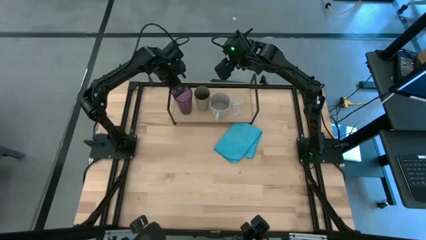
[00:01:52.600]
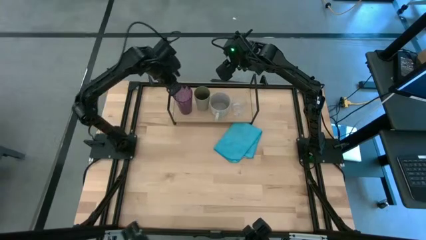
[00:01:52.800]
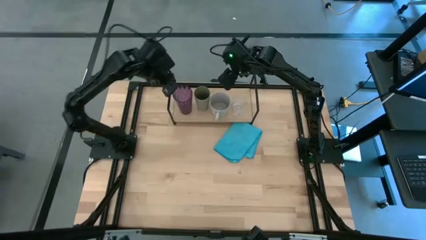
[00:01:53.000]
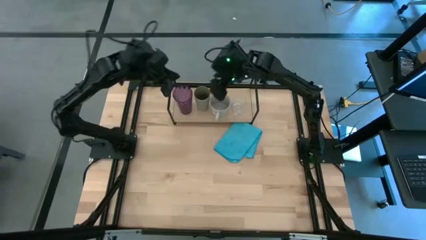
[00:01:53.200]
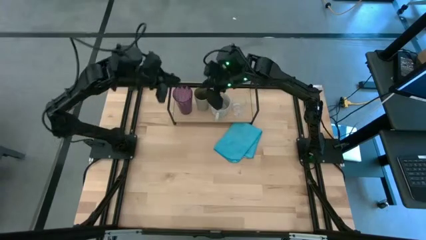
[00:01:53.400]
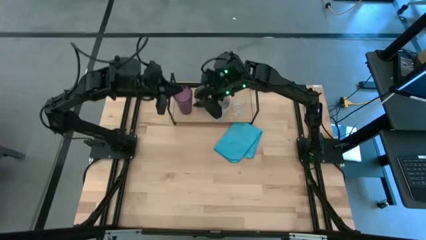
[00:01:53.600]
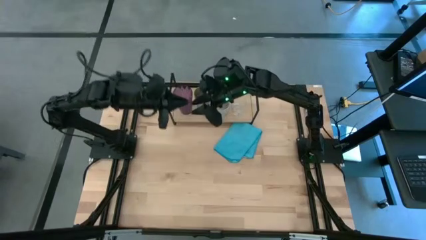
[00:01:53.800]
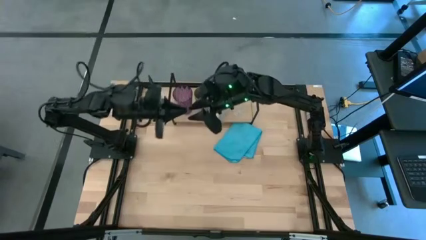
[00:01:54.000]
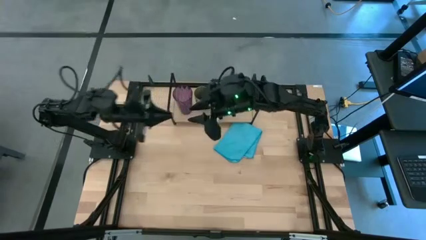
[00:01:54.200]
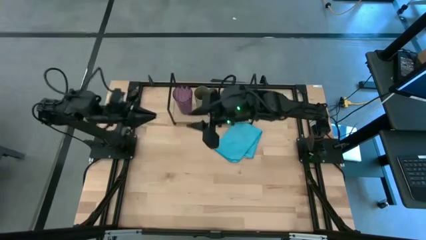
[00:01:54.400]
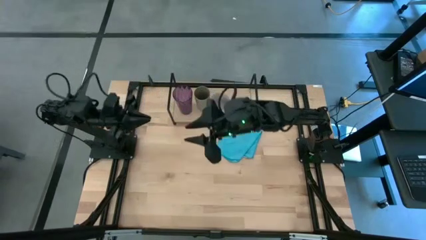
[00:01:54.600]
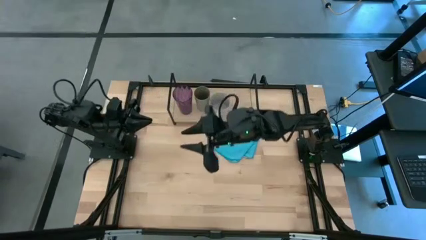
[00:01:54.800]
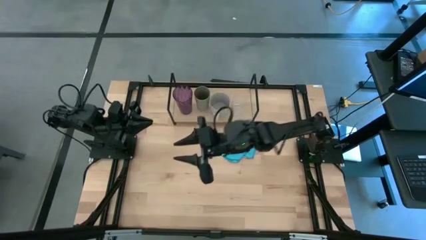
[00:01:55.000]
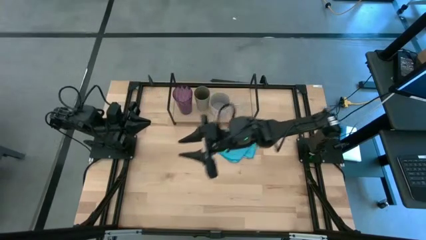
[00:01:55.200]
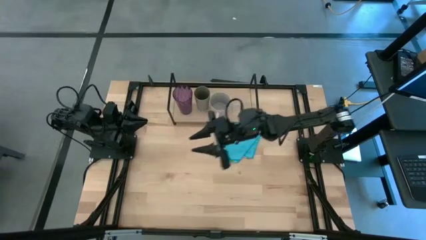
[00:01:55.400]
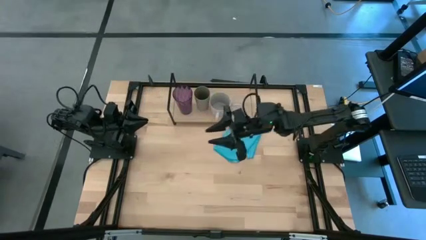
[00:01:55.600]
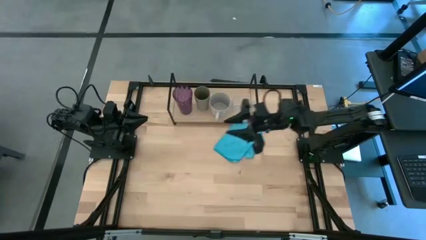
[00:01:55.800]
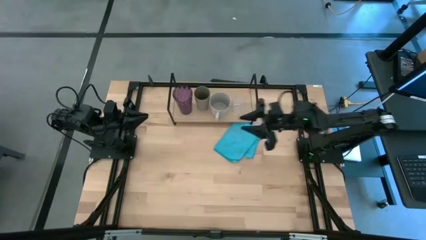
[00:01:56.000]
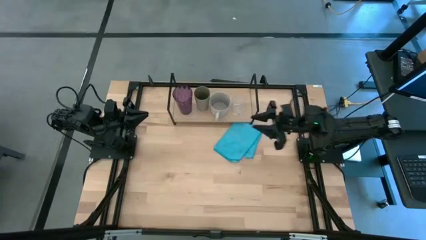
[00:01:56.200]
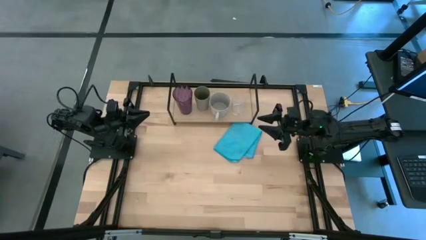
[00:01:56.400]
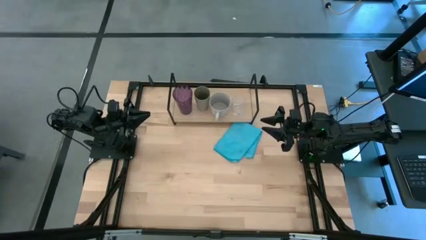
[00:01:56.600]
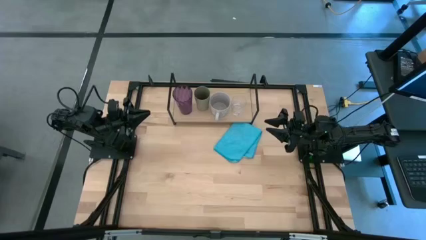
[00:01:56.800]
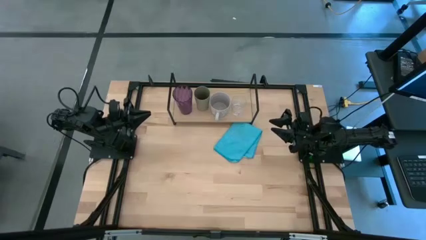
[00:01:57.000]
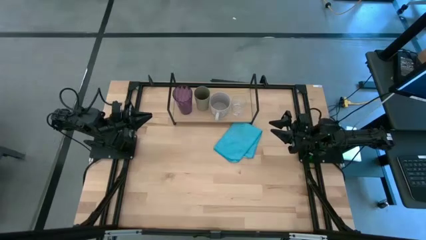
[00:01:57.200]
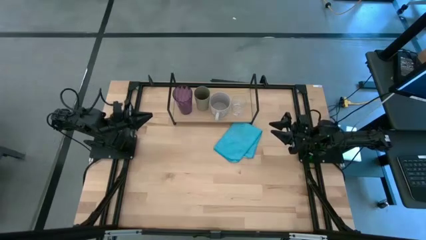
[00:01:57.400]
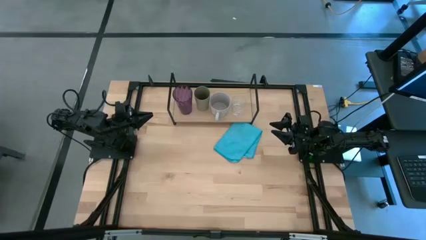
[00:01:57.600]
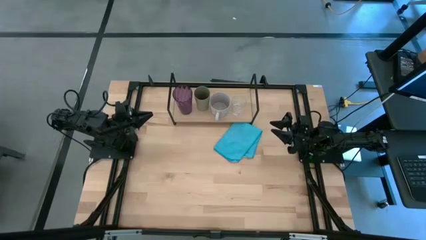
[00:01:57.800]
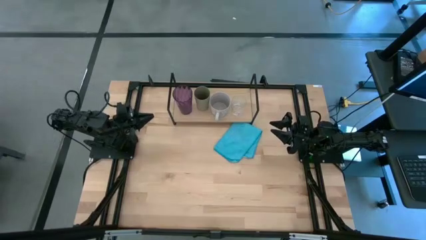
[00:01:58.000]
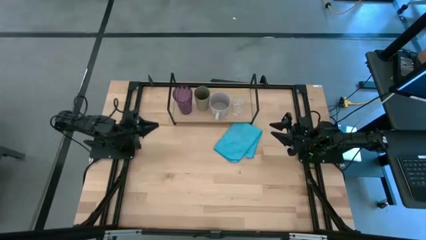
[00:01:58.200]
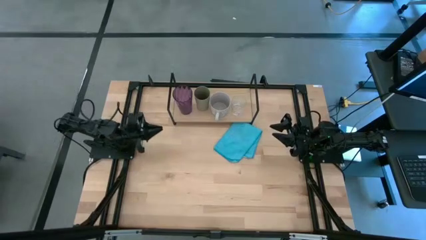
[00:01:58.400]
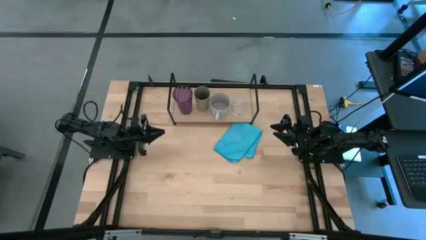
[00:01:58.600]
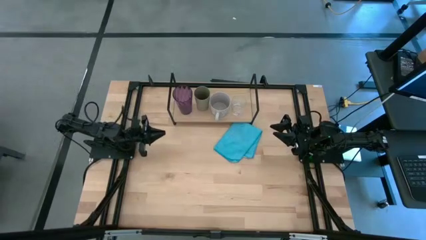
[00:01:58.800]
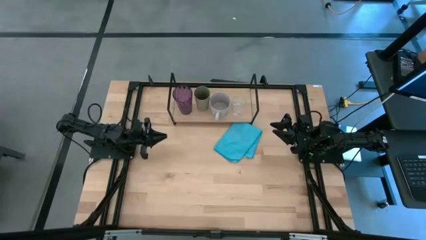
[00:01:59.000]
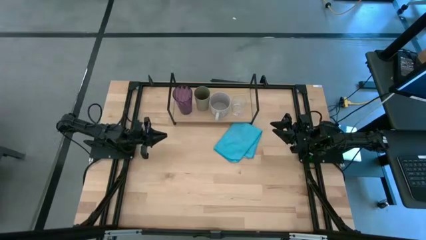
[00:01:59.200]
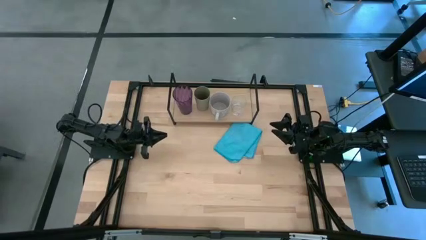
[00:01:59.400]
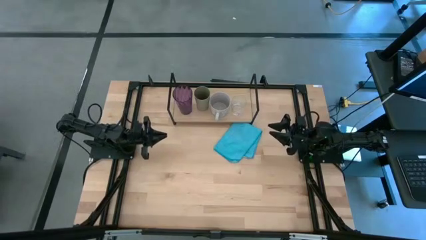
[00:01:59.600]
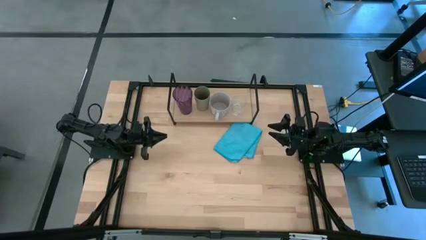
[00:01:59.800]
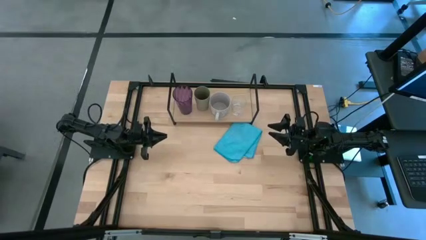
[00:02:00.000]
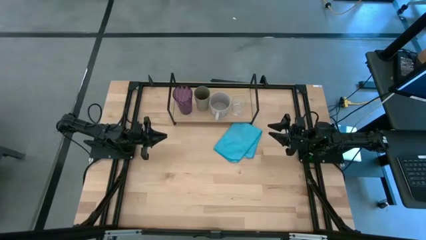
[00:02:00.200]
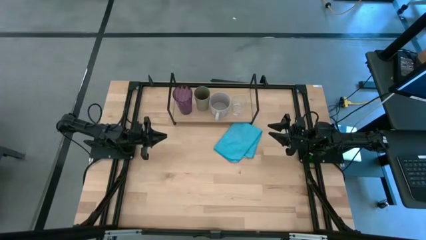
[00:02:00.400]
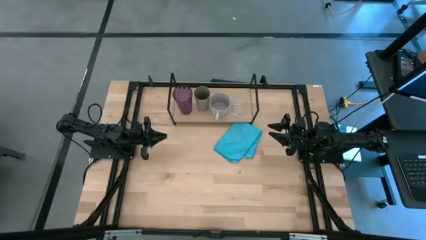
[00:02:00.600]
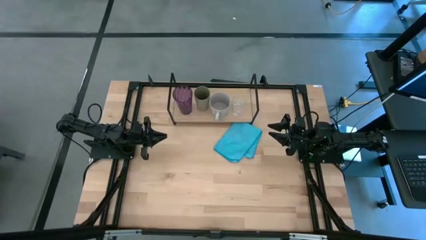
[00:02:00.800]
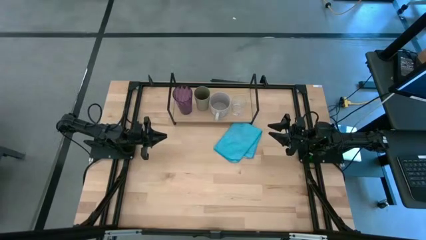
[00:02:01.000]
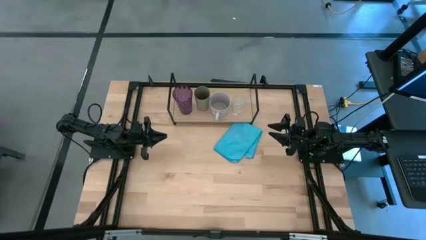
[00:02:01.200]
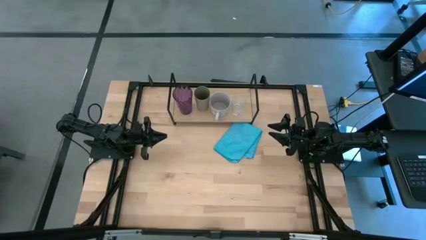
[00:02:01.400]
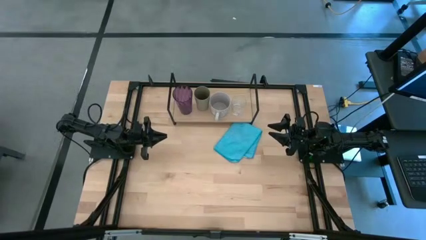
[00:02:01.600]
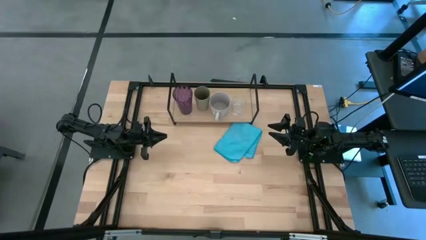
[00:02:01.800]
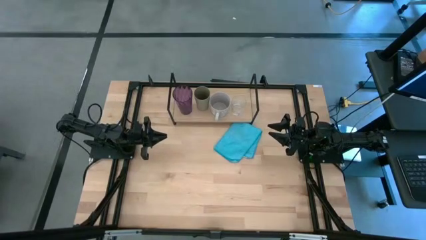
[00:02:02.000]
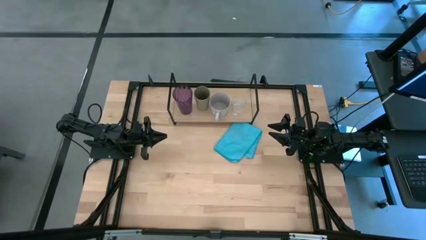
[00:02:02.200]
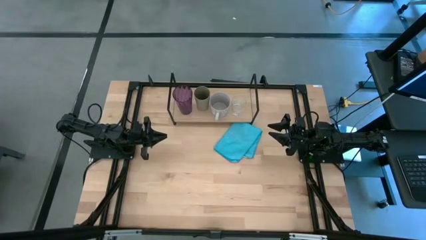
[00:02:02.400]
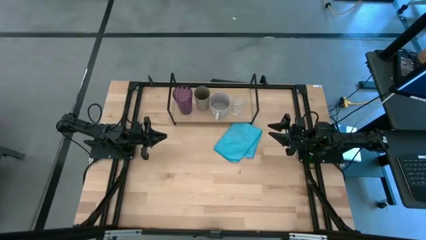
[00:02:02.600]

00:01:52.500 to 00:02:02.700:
Task: Stack small to large cups/mugs on shelf
Return to Home Position
